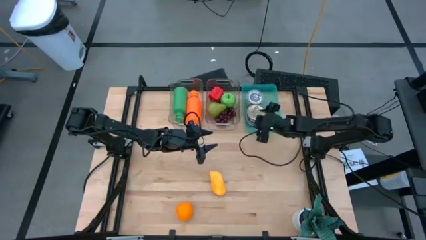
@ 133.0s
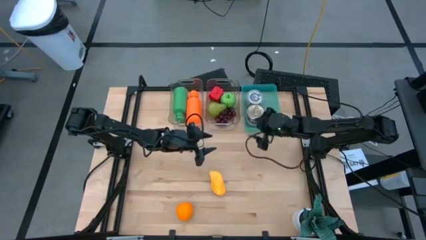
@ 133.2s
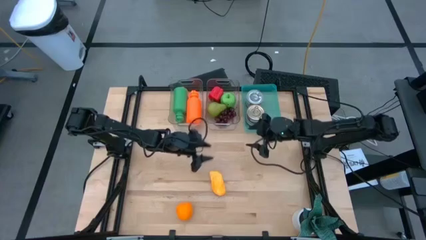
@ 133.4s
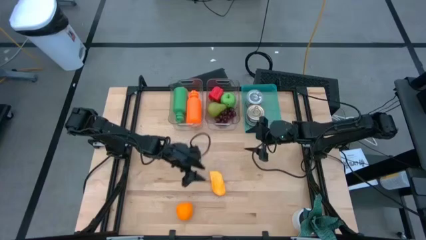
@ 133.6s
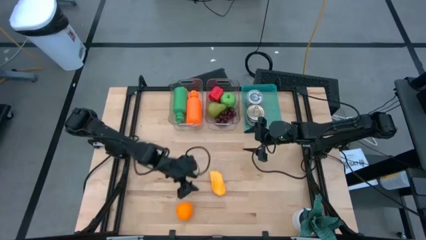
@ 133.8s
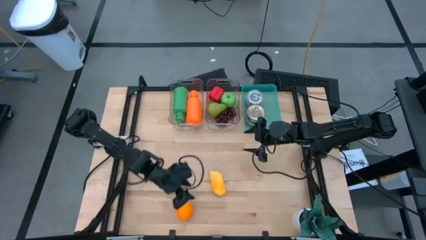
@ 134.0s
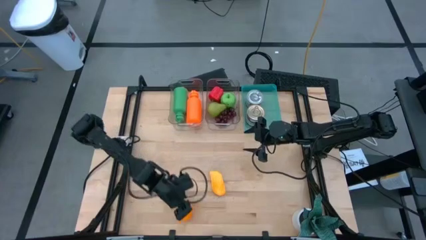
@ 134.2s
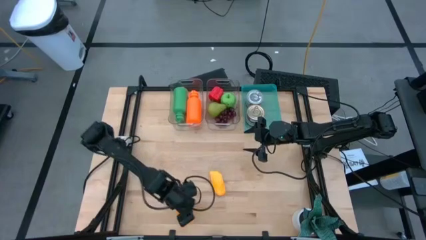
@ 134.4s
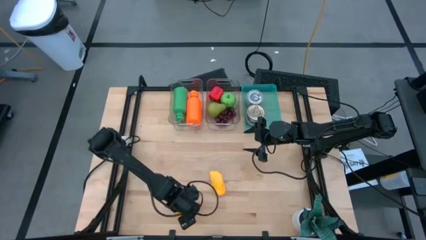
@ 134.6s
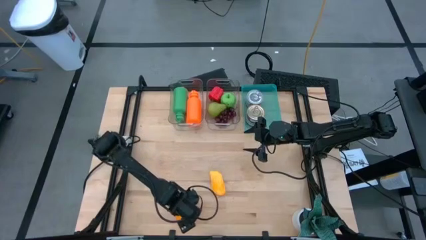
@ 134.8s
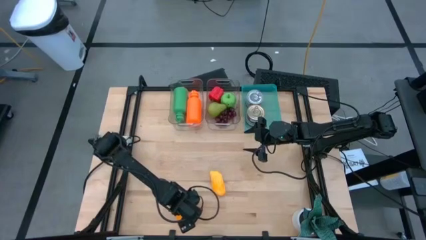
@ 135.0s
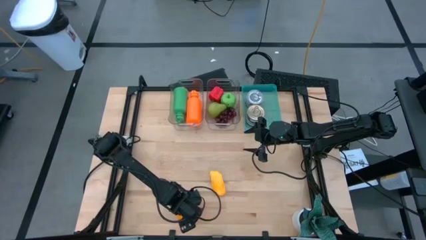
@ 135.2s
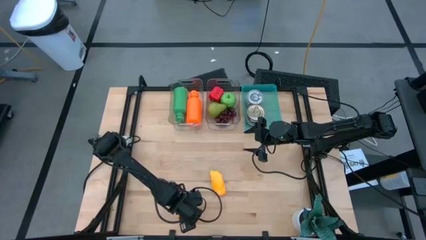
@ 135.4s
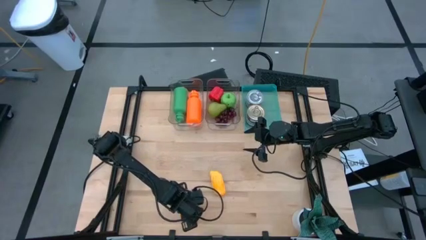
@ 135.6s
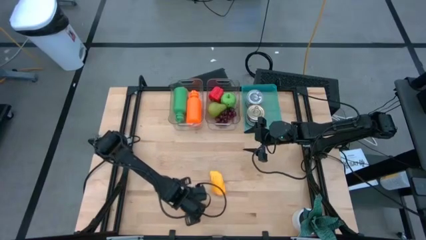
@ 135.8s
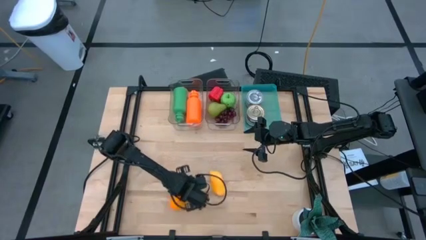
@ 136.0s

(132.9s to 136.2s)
Task: Pick & Place Food Item
Put the orange into the right transparent bin

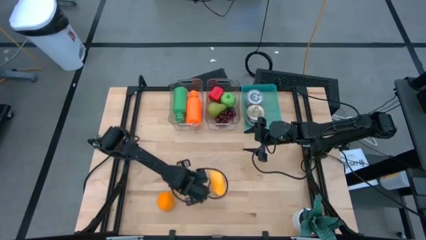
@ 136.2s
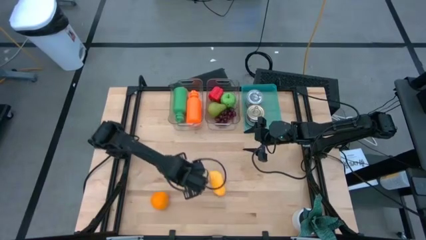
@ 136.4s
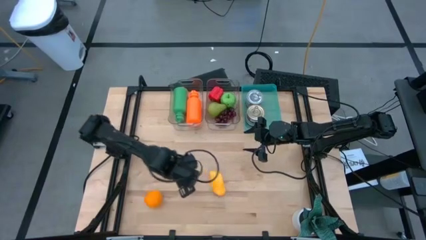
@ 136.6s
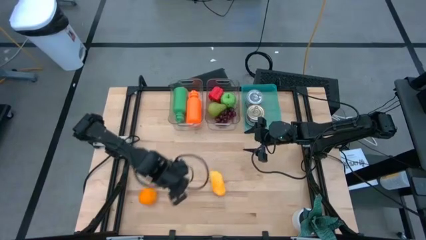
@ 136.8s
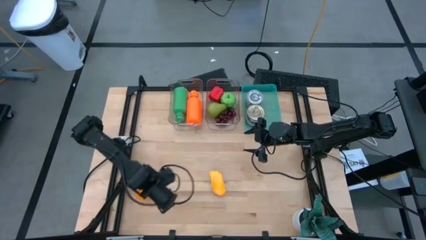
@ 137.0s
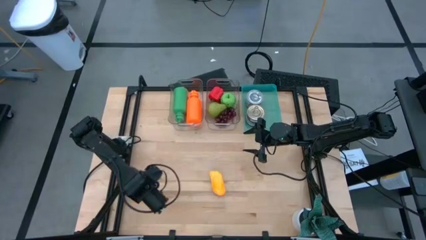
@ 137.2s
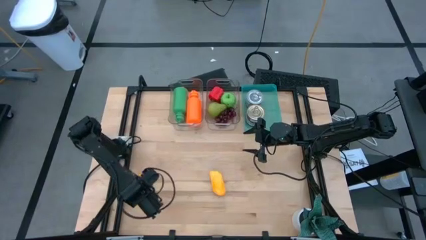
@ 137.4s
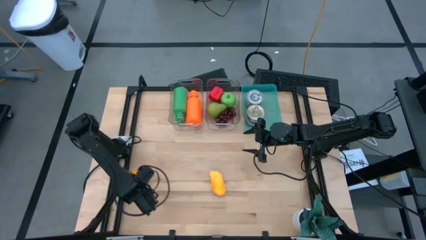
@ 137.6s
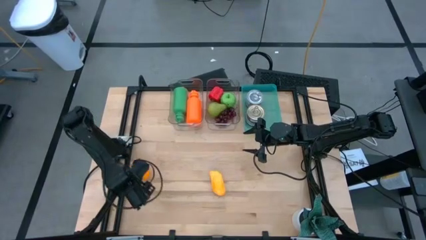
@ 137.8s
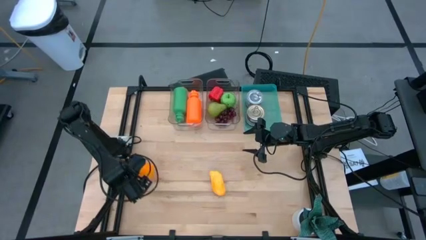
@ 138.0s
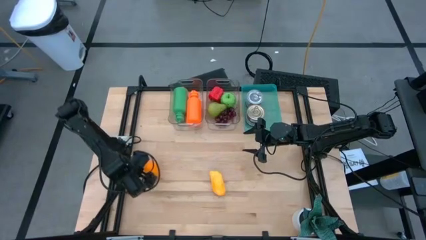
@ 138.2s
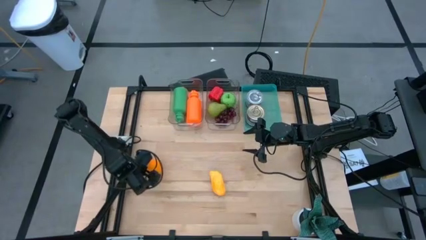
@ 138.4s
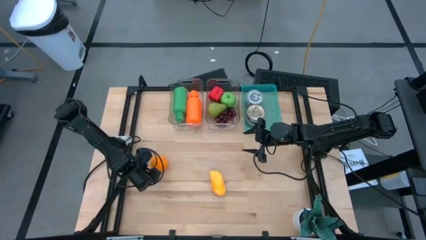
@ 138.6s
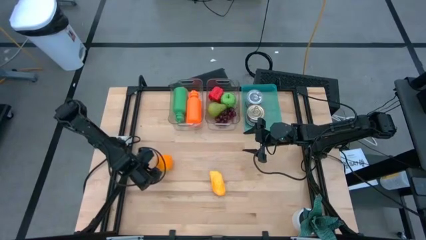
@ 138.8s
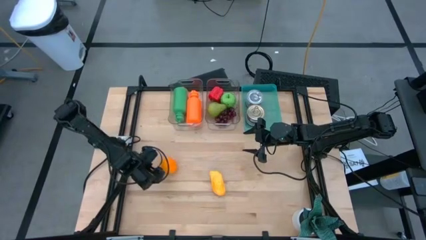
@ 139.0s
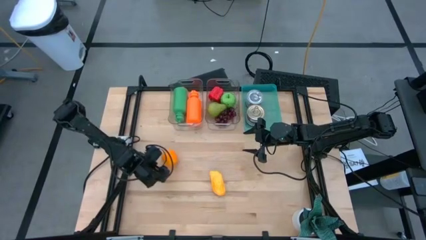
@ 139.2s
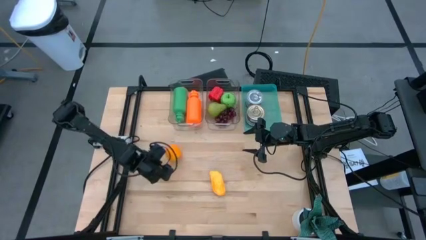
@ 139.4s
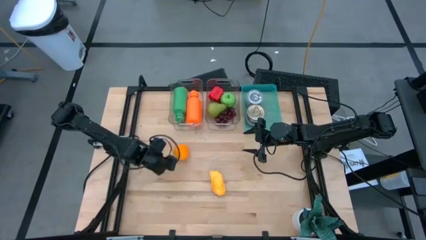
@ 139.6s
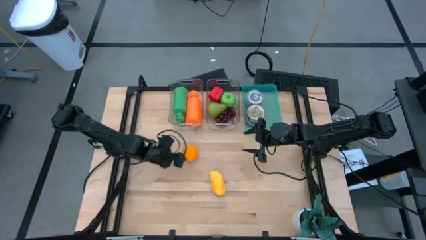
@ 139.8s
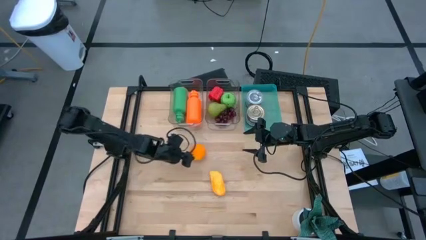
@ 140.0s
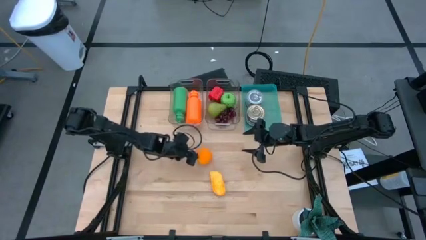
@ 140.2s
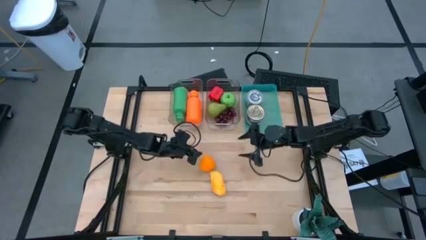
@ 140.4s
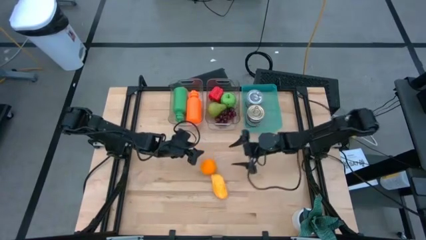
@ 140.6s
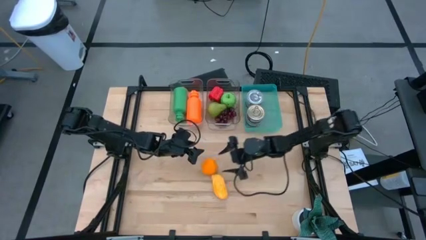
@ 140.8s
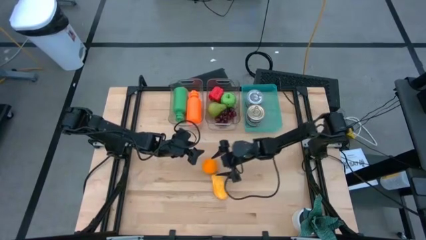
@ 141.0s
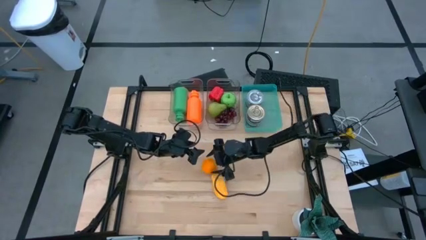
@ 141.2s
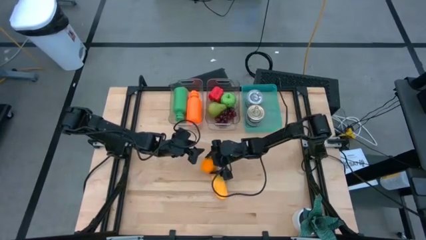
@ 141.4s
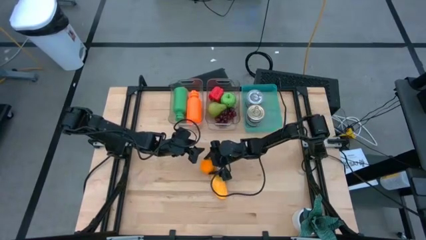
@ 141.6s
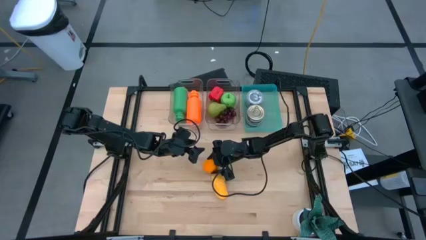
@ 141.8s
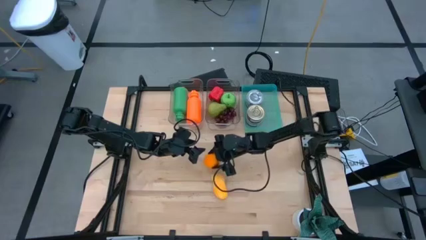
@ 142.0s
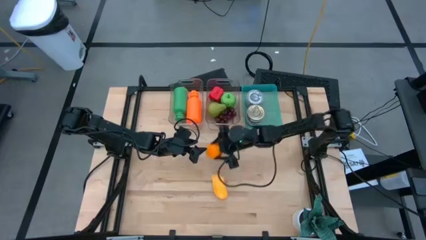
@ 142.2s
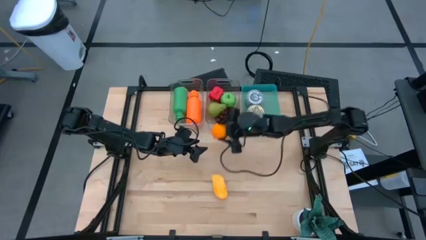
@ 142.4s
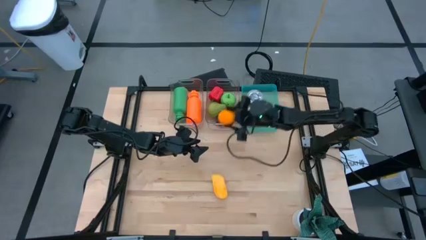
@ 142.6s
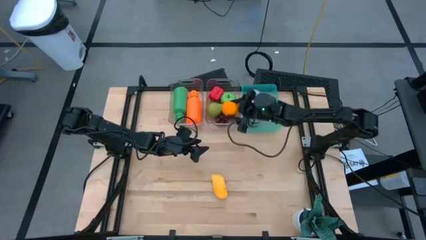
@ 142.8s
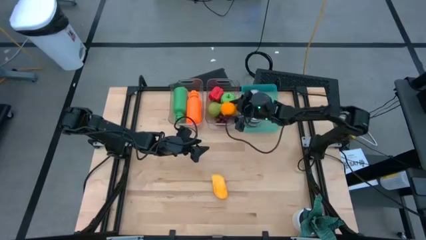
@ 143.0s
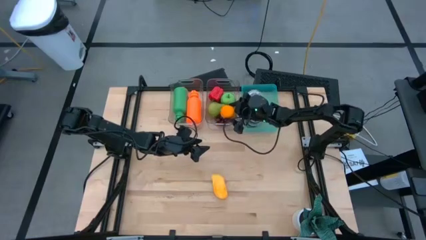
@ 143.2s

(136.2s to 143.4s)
Put the orange into the right transparent bin

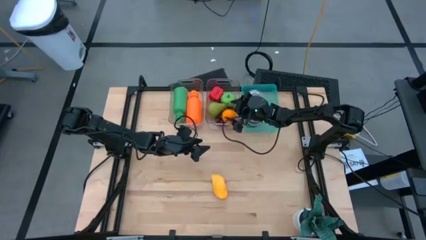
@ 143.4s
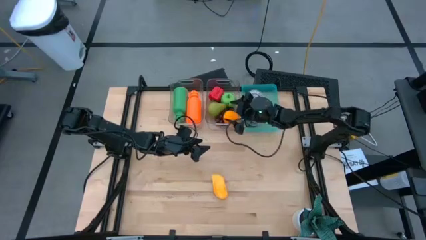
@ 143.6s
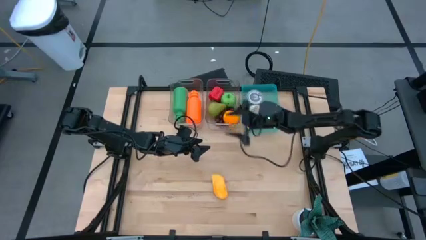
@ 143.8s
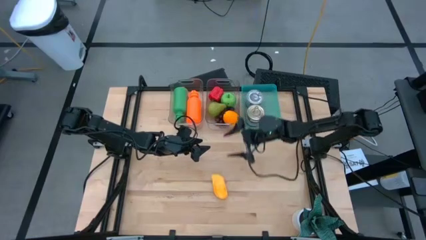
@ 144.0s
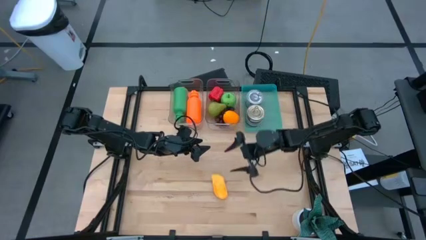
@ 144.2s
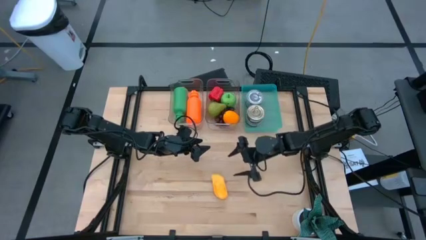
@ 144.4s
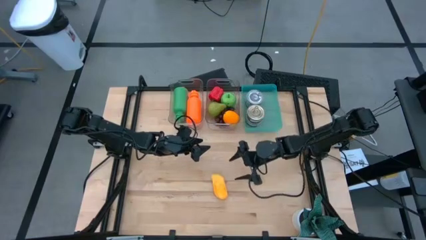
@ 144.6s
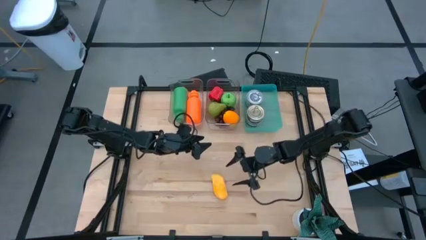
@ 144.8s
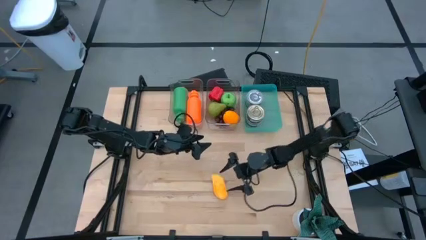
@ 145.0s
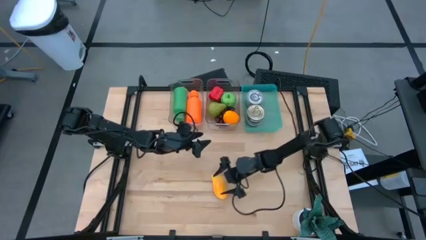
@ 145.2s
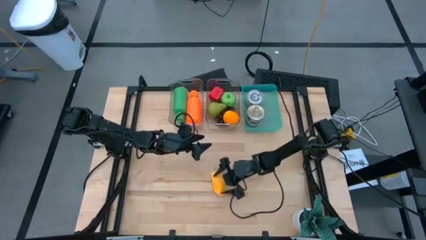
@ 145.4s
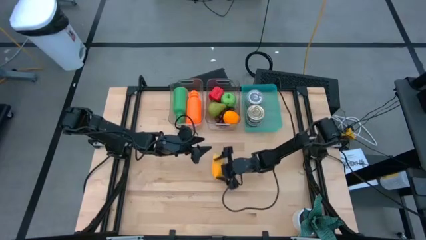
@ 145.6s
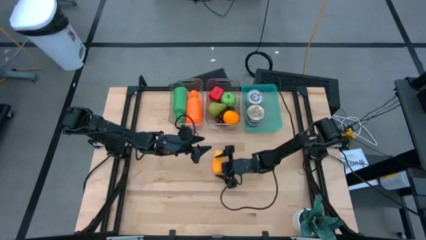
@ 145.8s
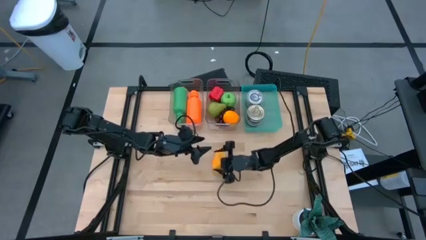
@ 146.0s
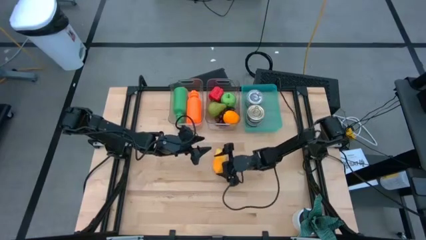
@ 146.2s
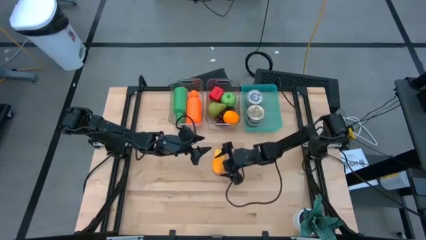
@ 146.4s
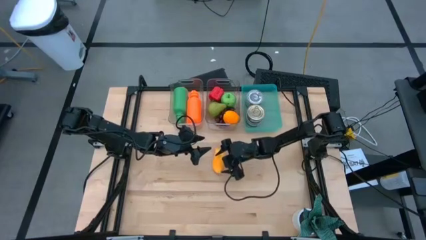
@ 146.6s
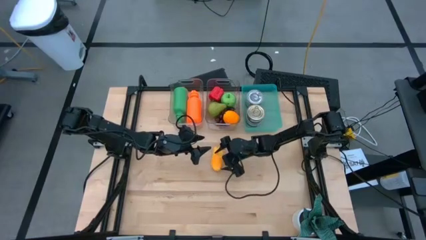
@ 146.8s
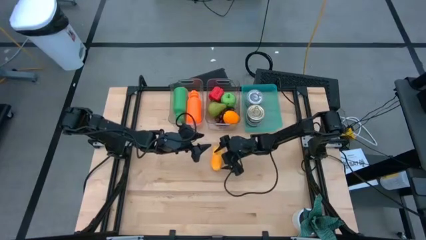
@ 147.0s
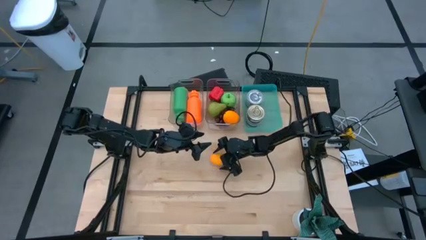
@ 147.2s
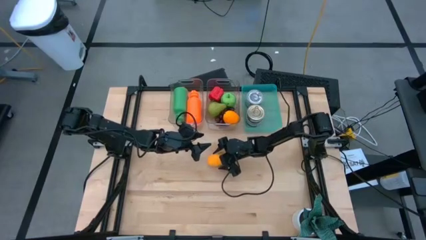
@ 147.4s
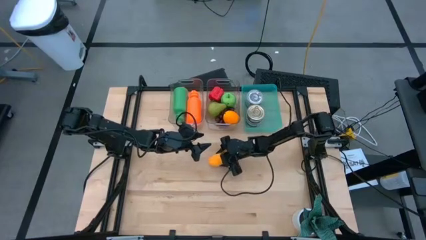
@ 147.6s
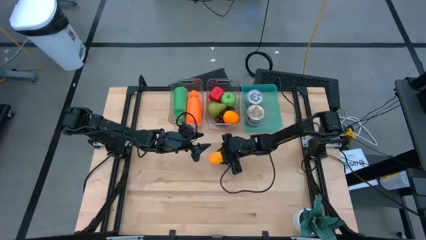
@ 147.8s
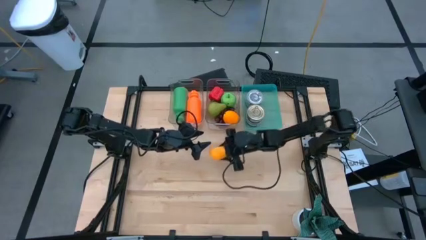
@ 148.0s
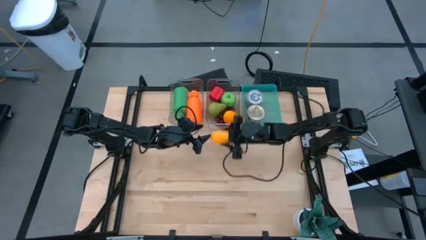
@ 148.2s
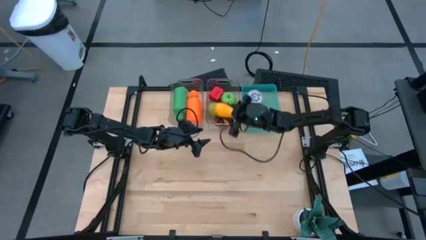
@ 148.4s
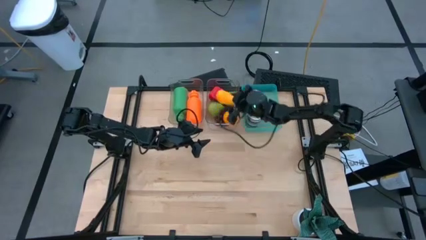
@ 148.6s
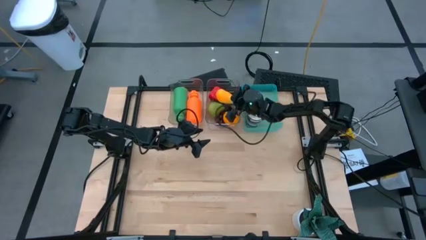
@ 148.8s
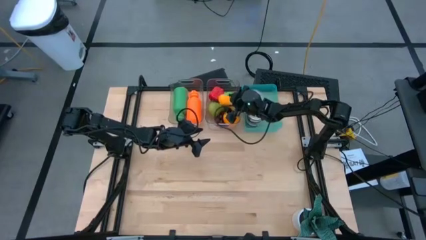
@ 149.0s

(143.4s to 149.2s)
Put the mango into the right transparent bin
